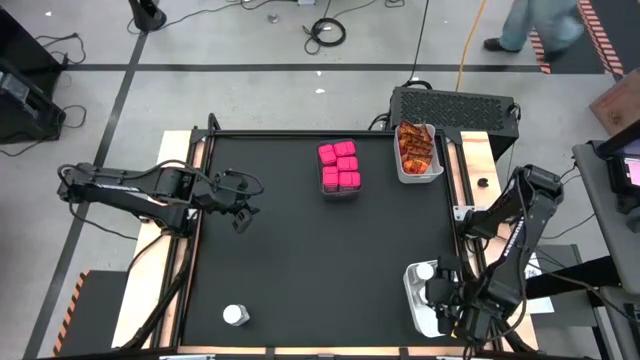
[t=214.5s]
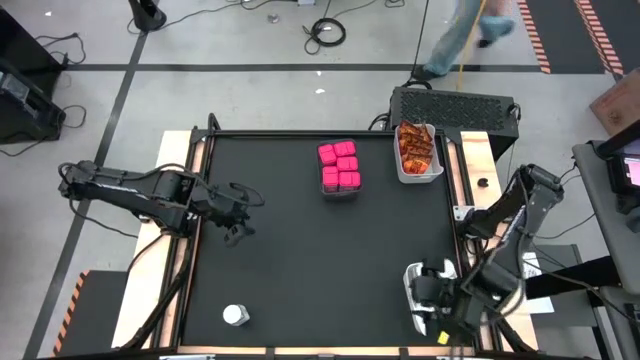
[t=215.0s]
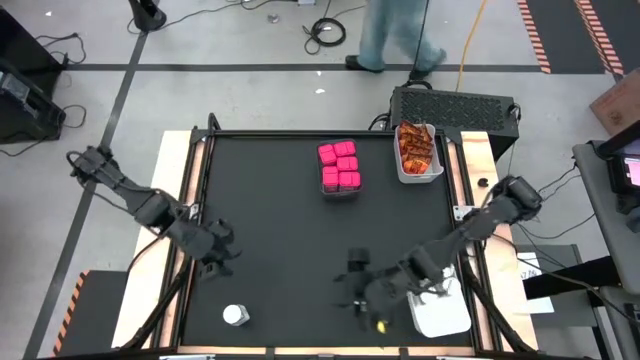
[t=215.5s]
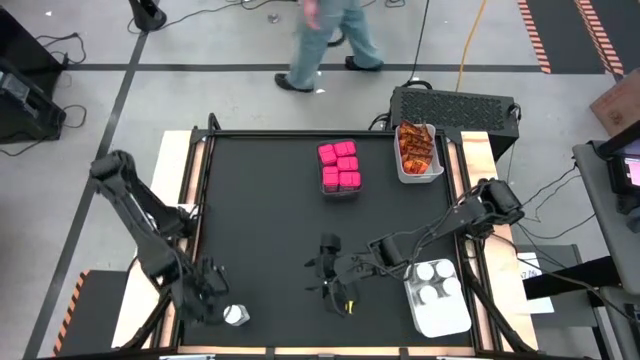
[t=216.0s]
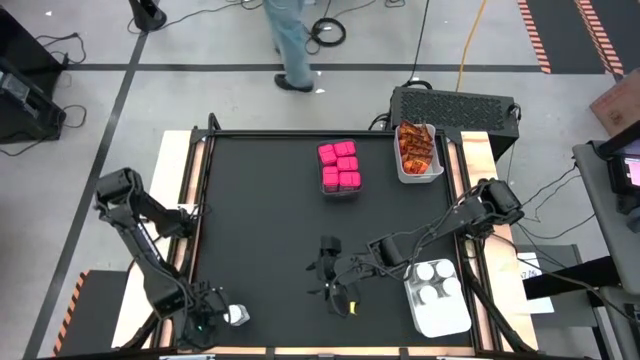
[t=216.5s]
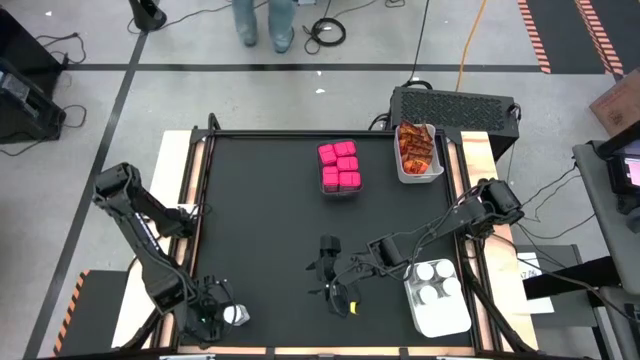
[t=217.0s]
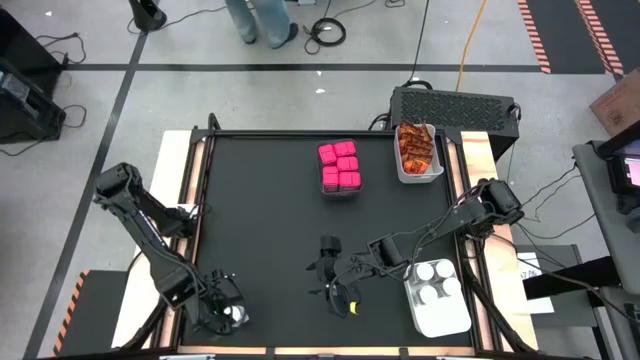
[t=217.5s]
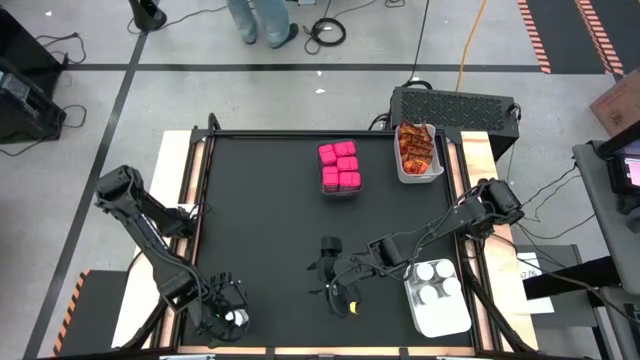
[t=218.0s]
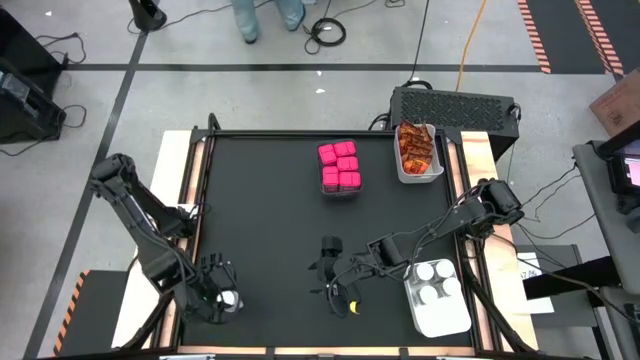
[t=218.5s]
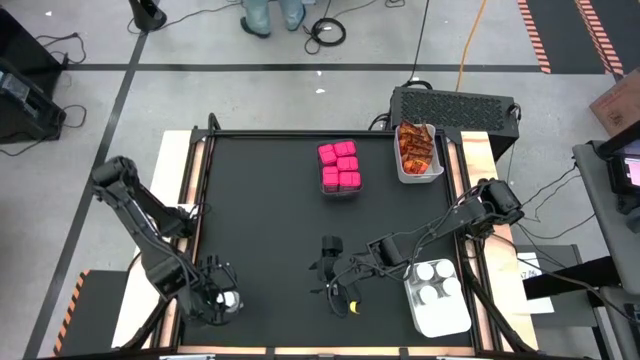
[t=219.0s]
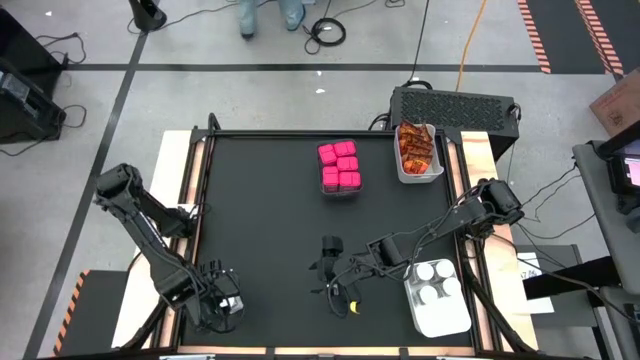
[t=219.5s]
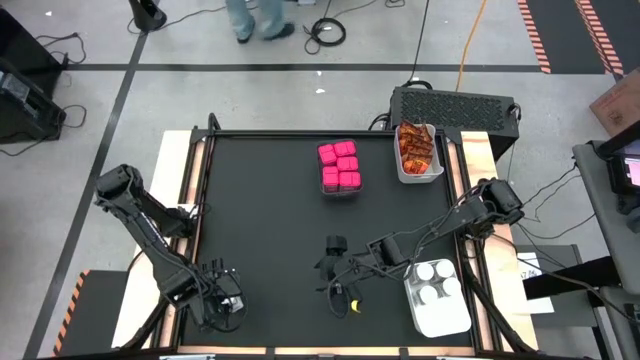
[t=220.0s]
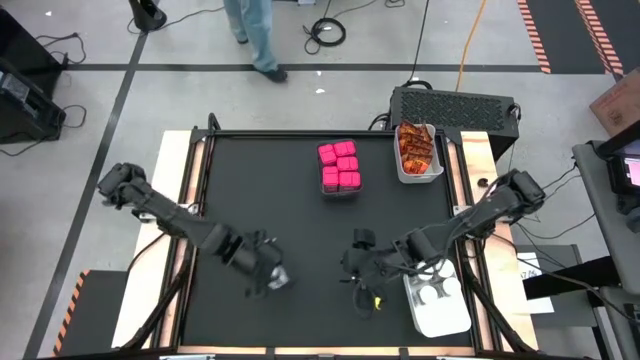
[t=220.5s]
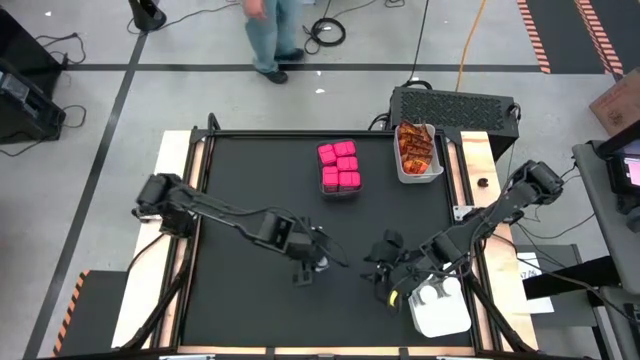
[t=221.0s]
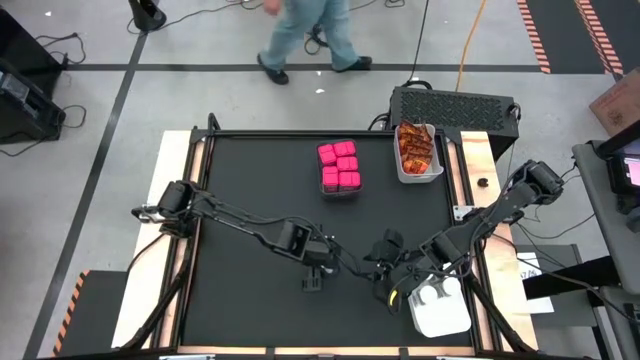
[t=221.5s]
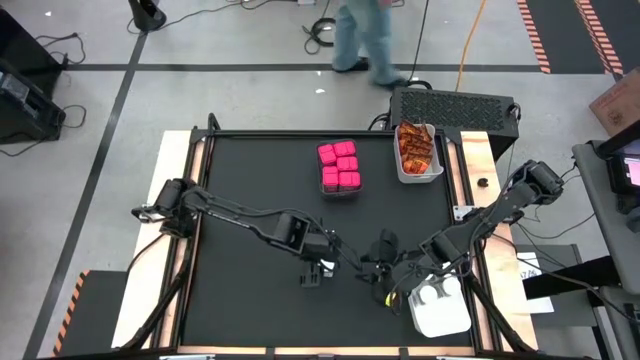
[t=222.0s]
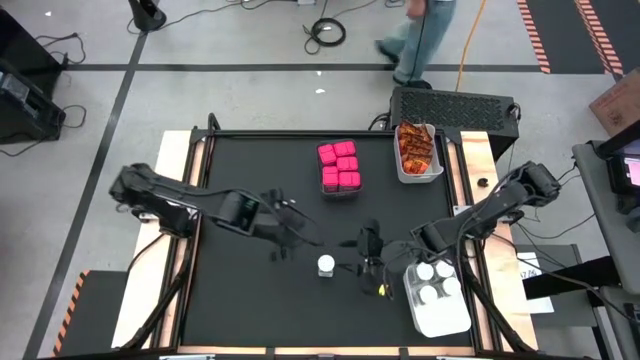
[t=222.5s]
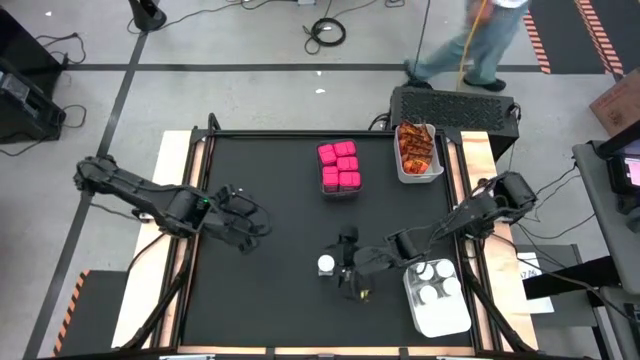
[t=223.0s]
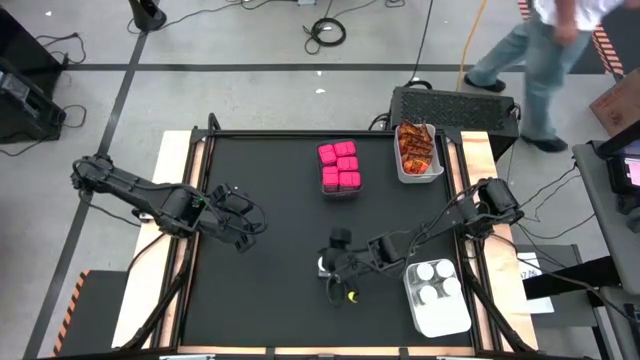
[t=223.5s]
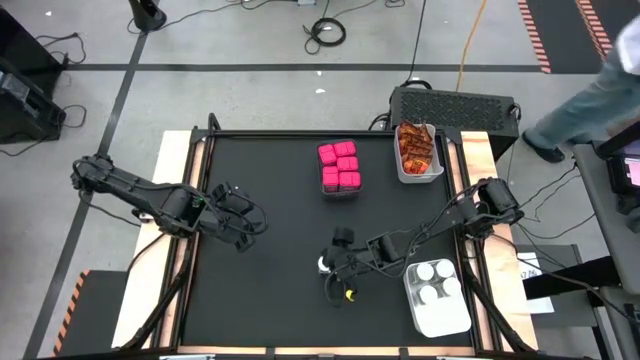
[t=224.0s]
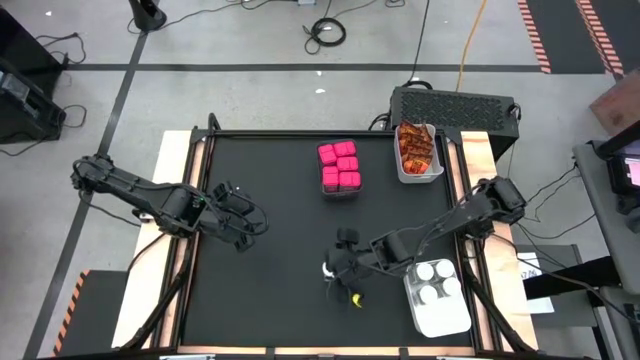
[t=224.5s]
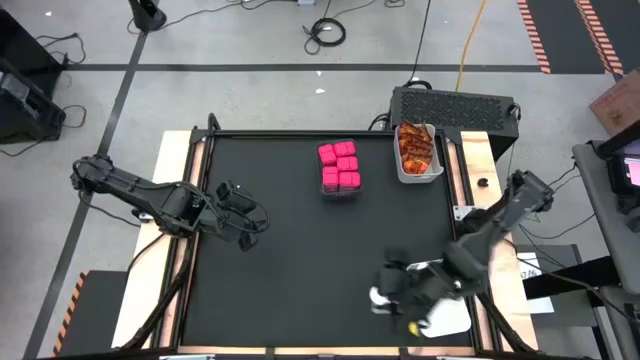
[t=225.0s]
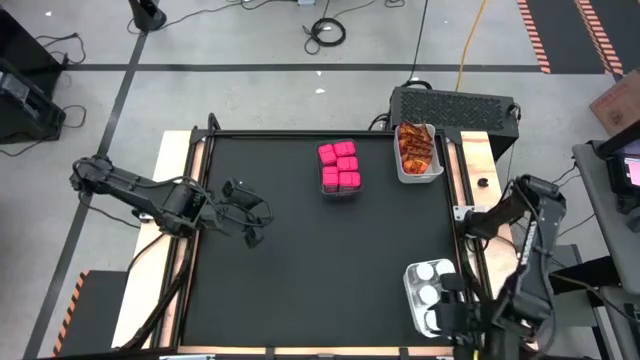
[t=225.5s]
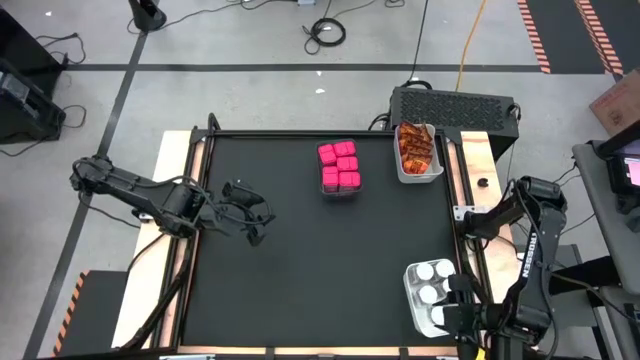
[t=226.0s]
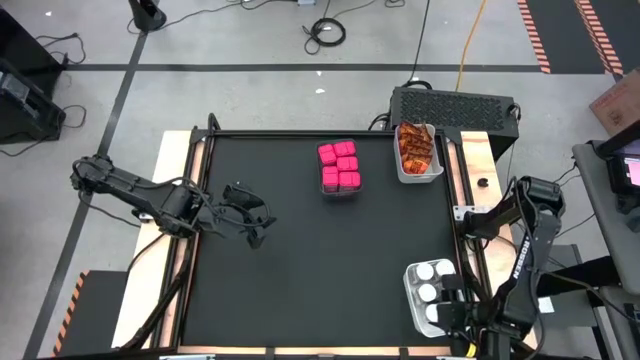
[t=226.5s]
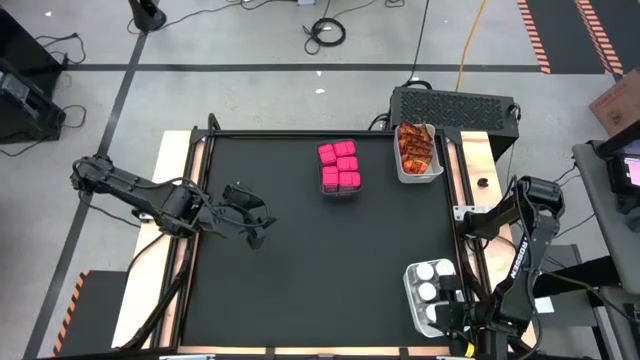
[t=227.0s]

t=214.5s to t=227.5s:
Task: Sort spices by type
Put the white seasoning bottle into the bottom white bin

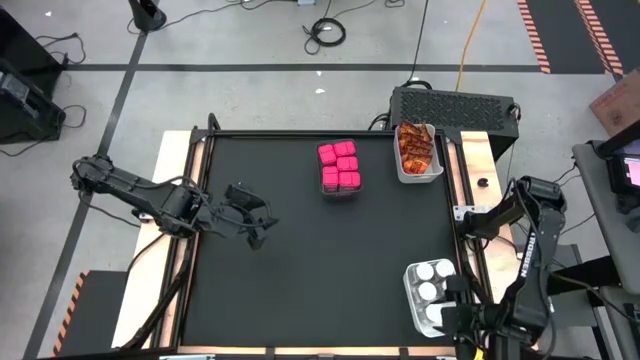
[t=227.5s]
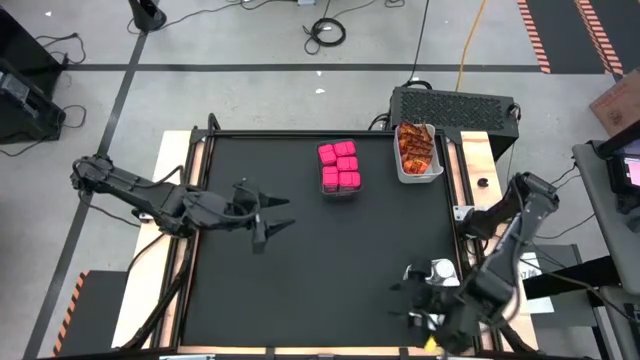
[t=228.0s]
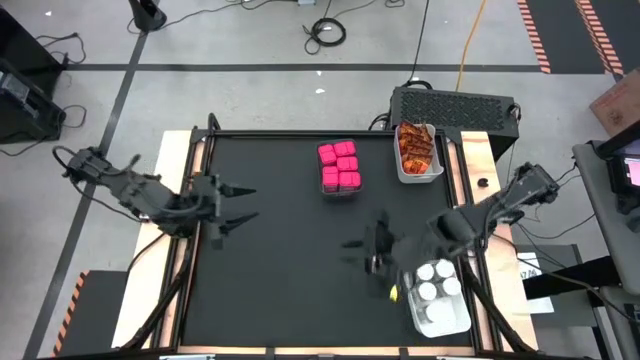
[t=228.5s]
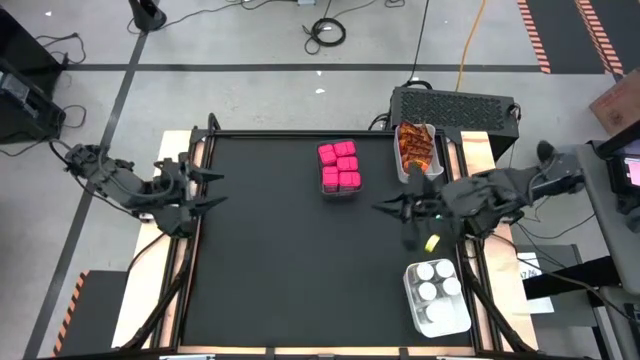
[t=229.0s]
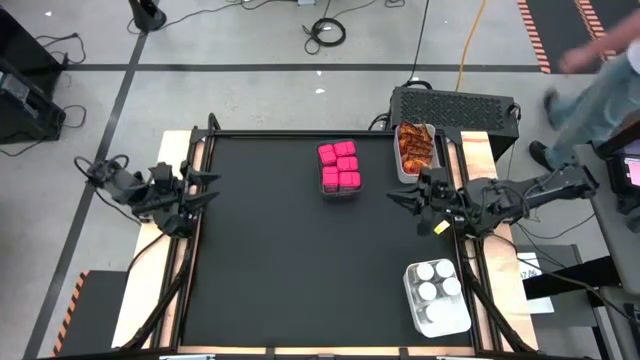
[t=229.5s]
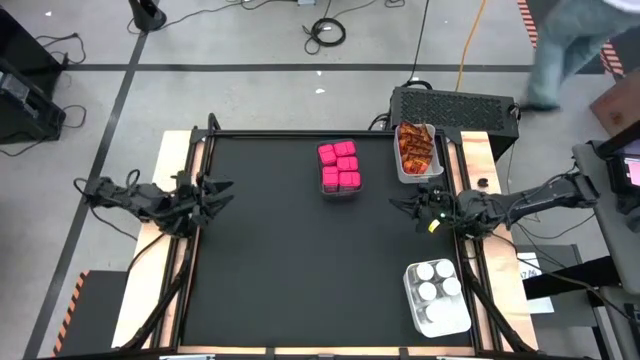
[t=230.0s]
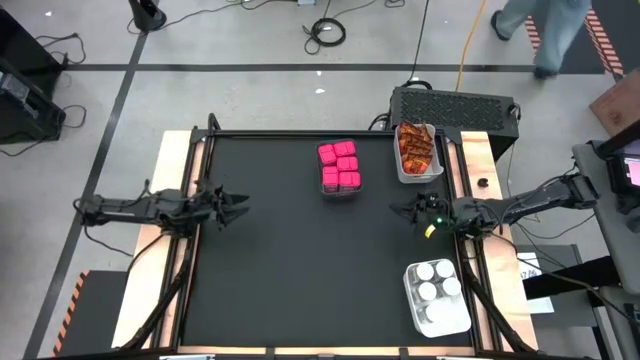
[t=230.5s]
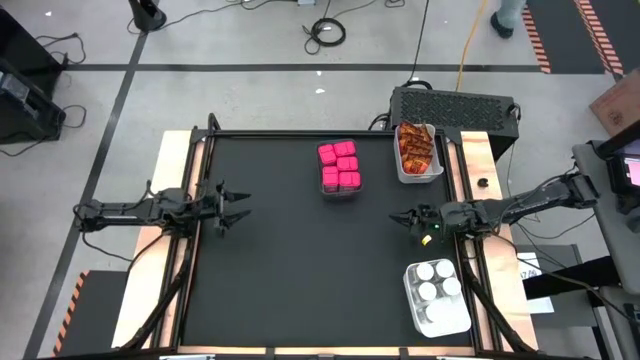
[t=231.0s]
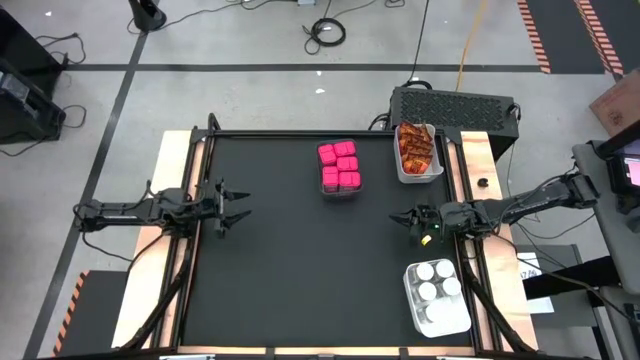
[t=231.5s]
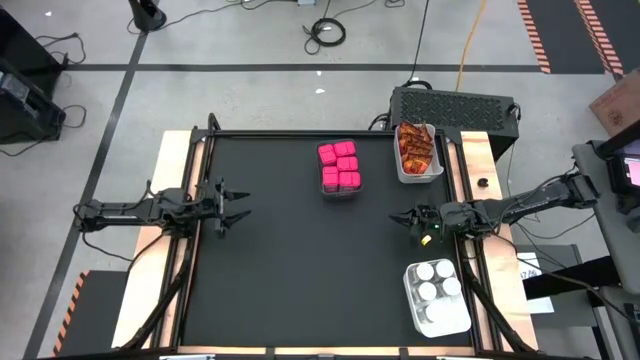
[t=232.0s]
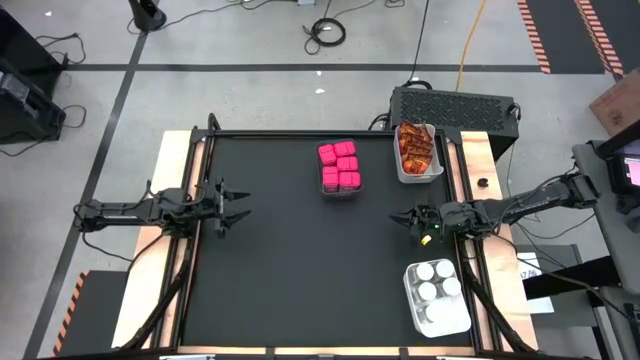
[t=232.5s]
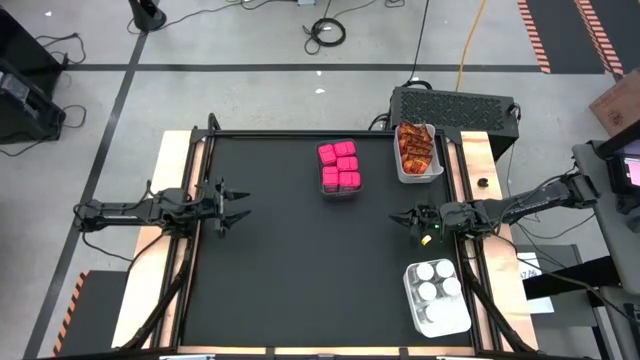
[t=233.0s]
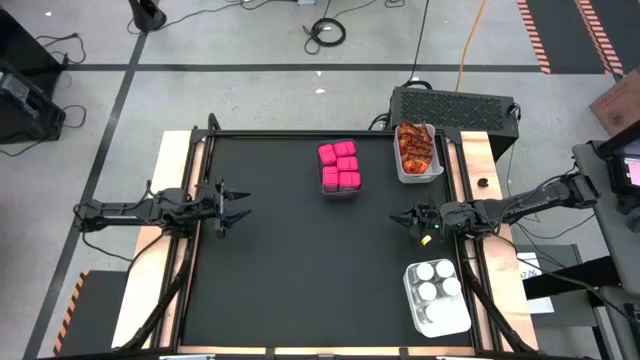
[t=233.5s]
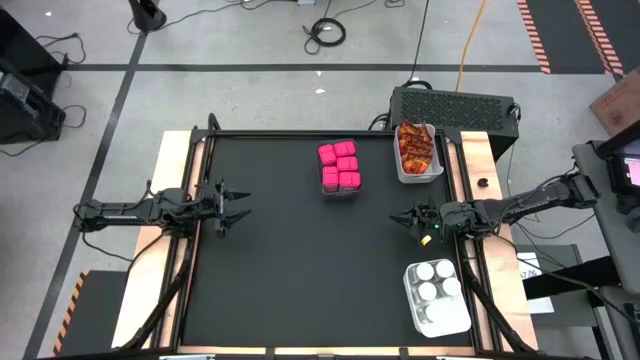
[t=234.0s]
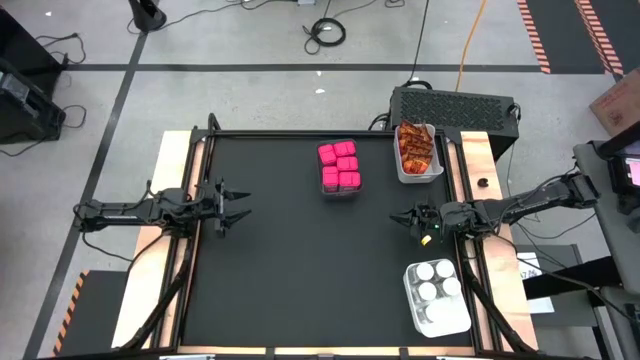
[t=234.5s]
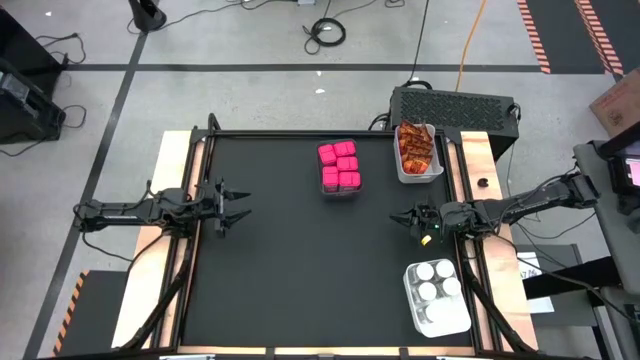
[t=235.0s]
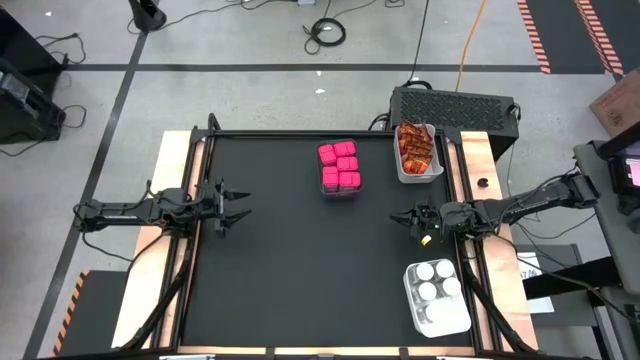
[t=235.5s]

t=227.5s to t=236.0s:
Return to Home Position
